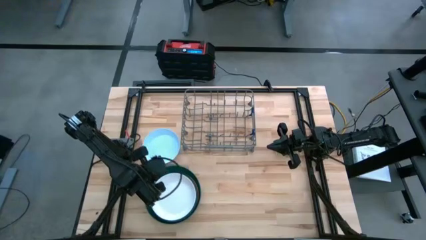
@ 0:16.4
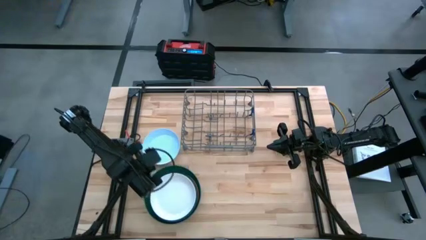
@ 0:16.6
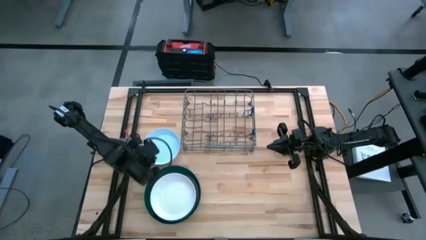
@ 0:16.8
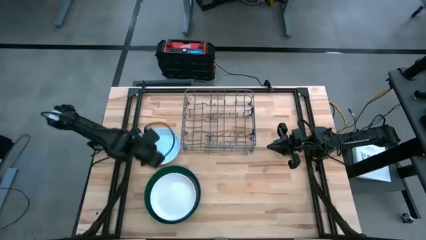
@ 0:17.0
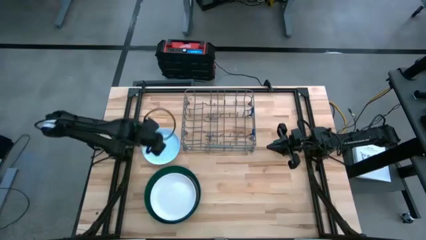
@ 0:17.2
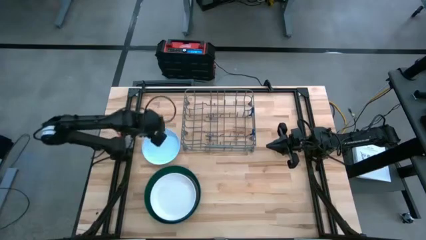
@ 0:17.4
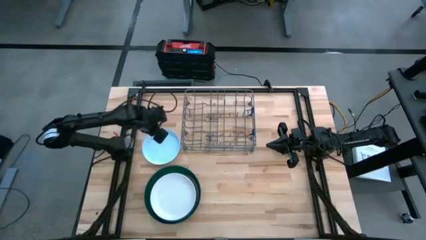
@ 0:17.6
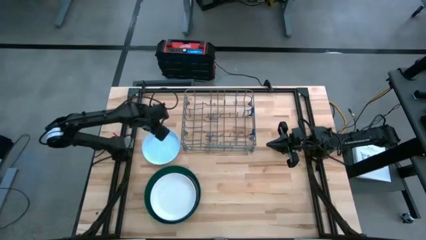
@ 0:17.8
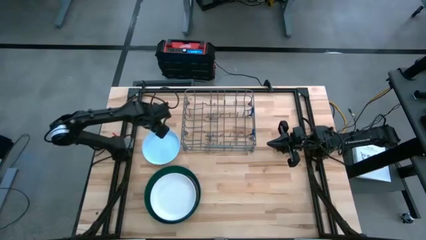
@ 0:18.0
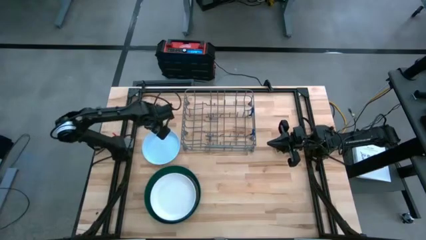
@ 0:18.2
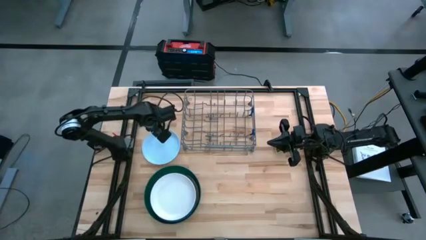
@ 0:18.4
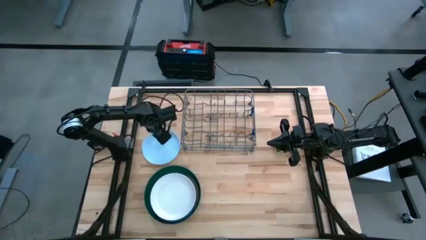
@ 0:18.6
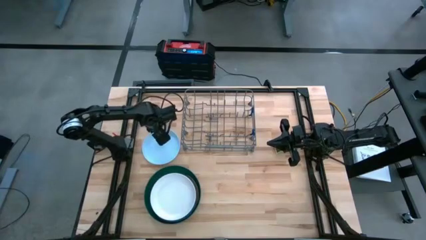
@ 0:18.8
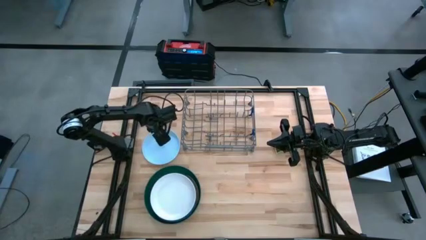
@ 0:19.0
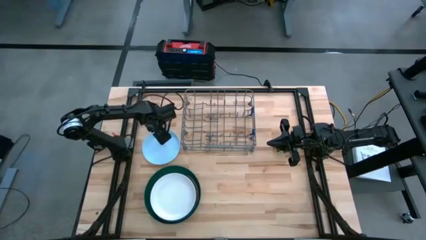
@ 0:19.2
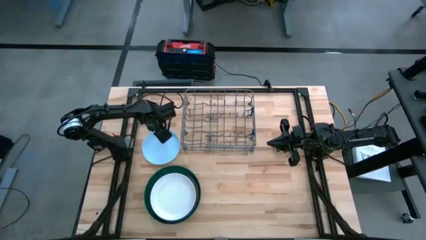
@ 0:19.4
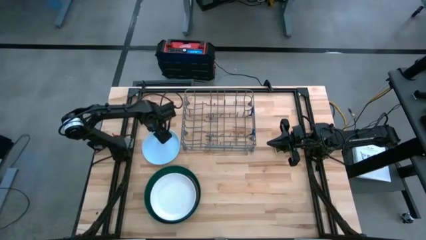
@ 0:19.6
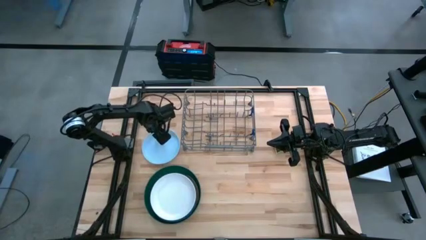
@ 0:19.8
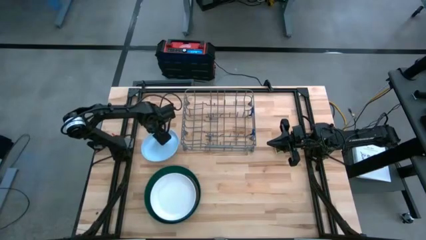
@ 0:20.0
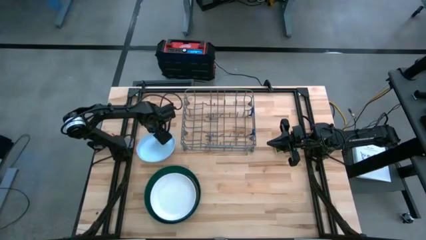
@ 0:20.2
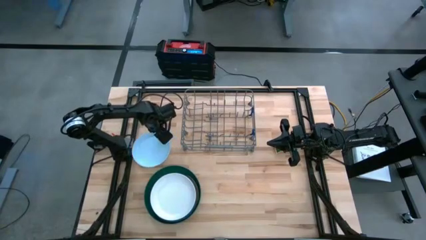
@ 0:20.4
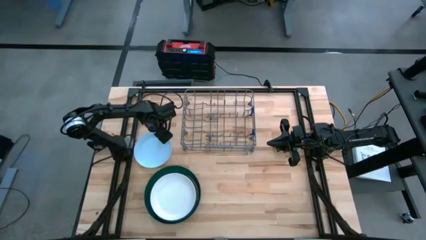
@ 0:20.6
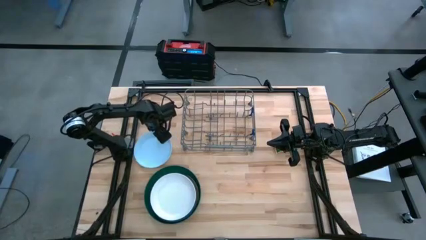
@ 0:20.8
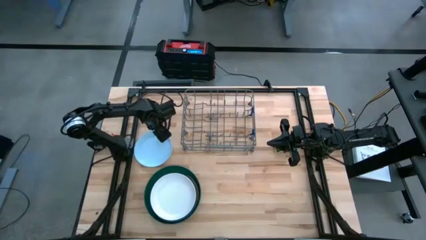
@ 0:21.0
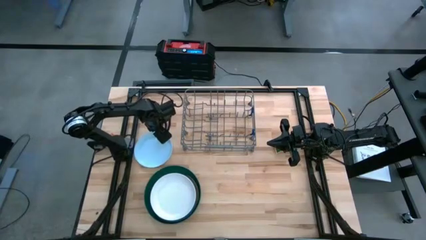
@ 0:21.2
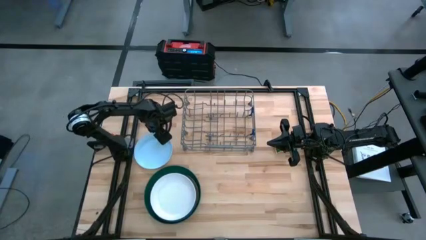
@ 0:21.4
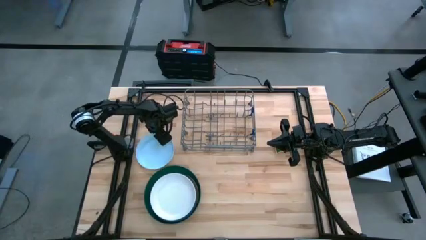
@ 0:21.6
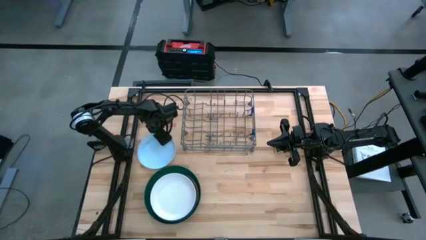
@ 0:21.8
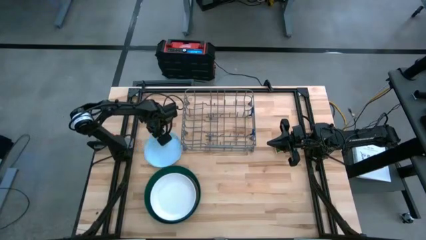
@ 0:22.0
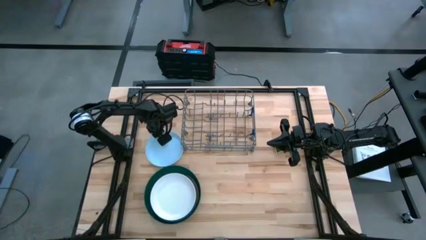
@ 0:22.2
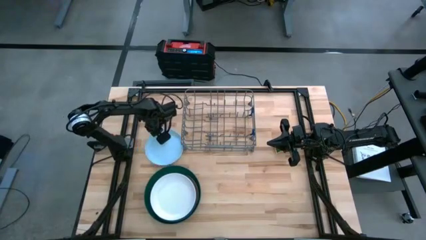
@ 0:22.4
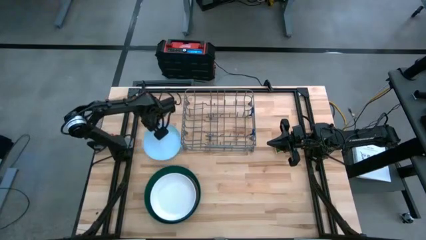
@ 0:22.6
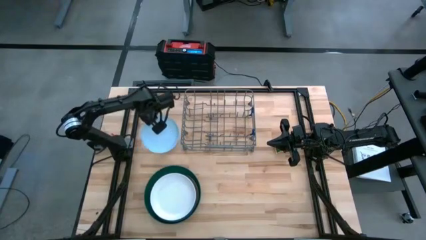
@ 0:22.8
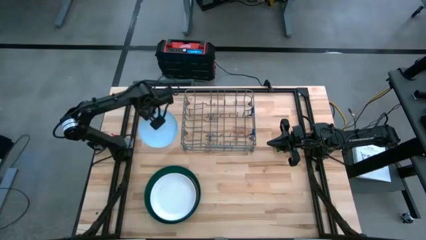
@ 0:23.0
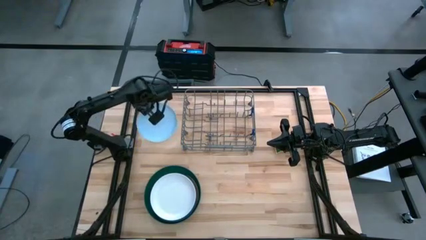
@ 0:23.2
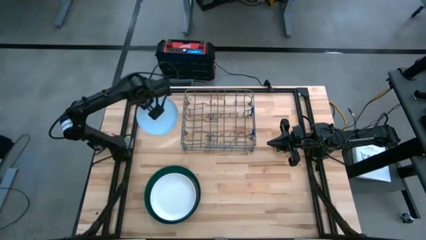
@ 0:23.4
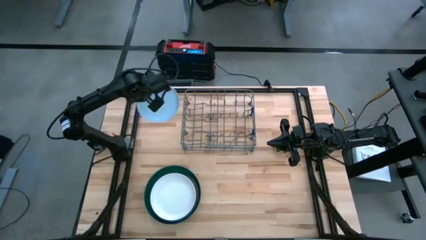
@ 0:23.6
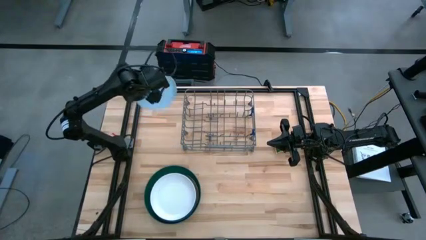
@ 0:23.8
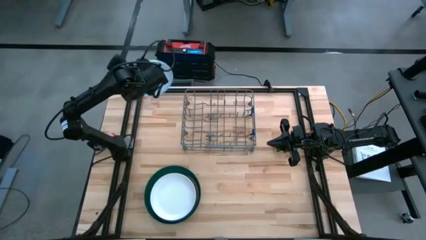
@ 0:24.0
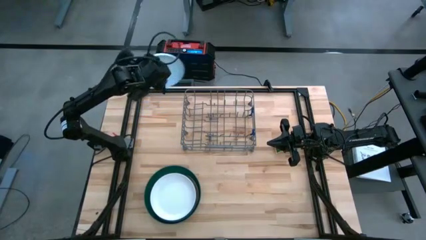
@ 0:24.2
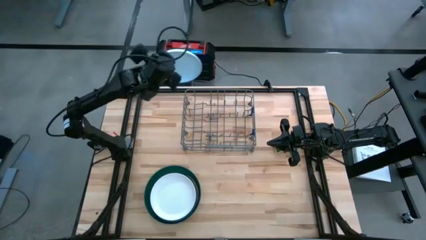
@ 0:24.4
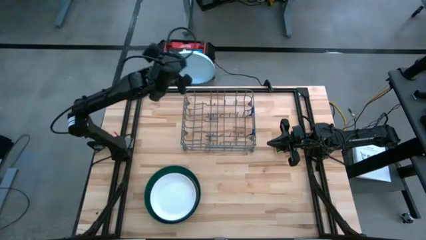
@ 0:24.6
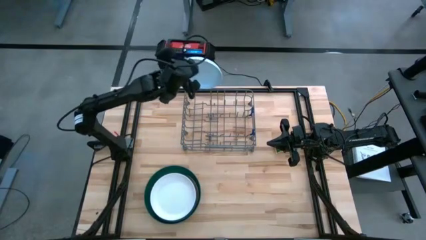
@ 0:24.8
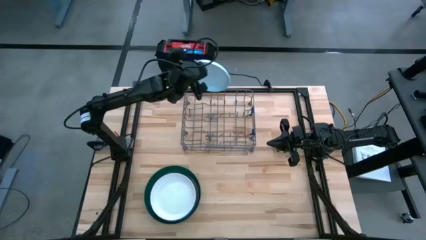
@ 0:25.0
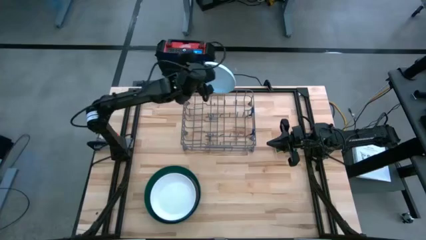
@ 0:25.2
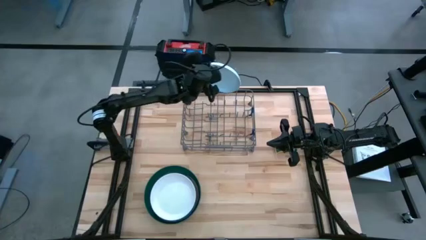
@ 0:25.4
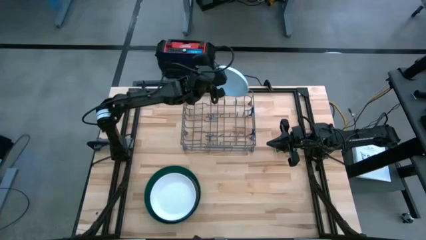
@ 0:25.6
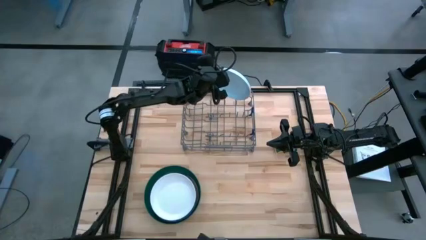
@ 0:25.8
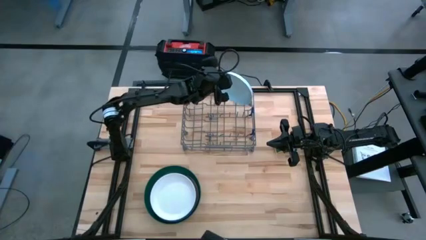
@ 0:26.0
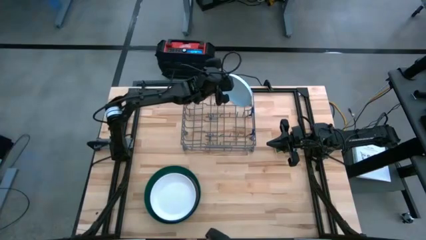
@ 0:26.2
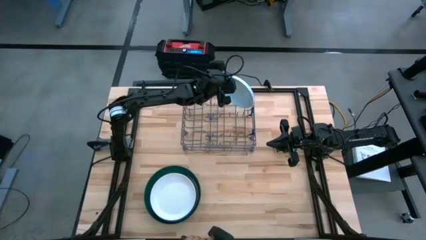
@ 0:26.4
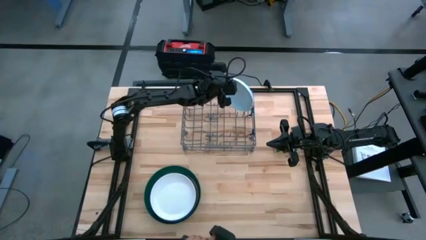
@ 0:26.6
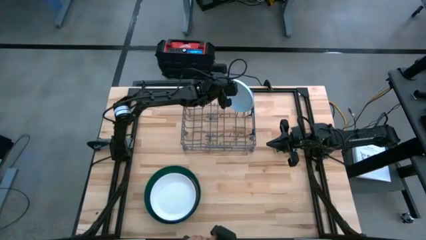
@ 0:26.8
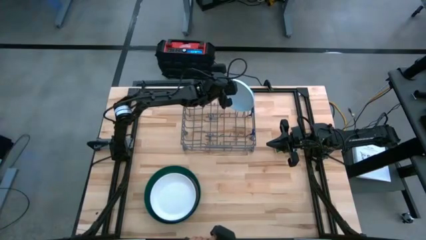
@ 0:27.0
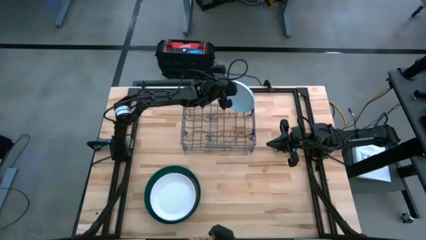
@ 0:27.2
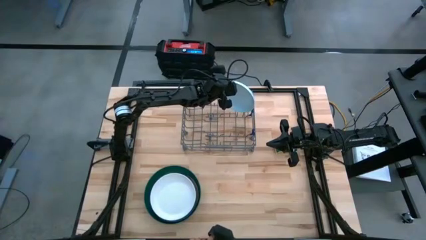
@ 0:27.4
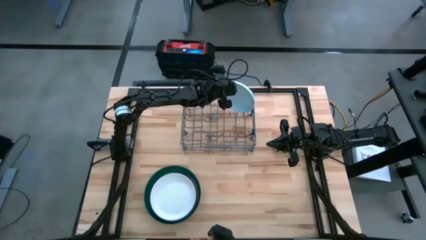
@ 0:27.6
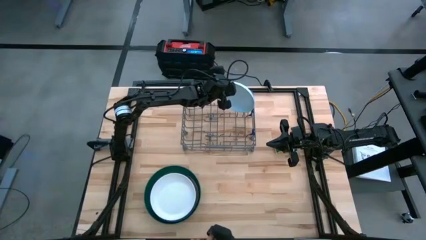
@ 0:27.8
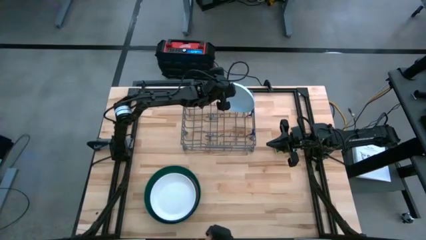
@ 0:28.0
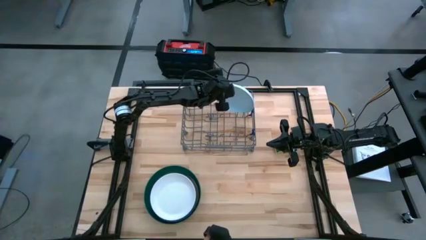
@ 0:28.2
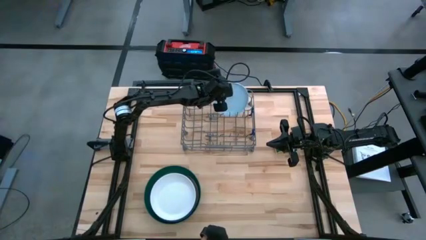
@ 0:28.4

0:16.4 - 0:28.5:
Task: Sort dishes
Put the light blue plate in the dishwasher rack
